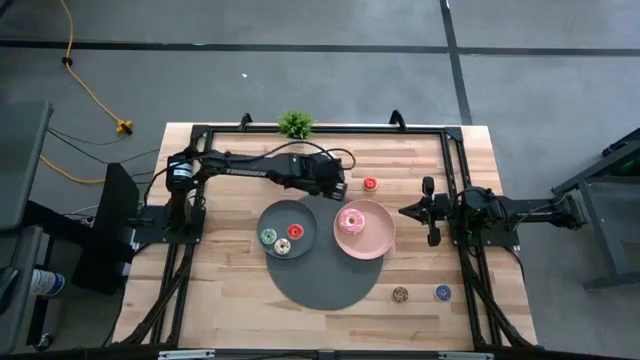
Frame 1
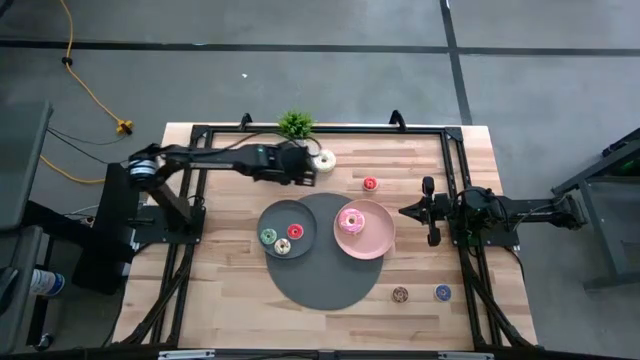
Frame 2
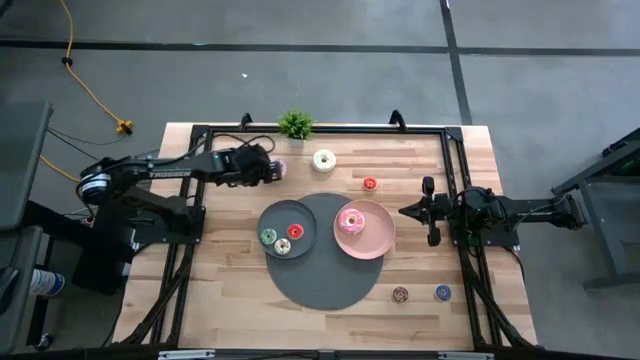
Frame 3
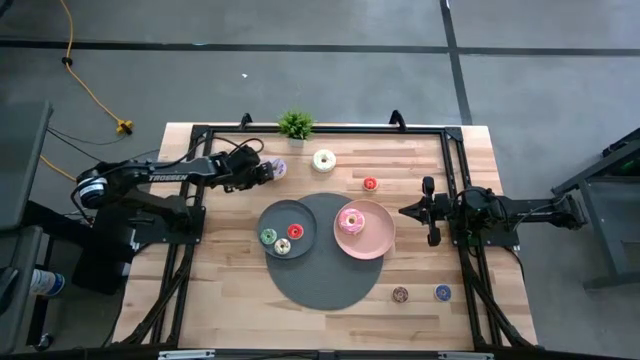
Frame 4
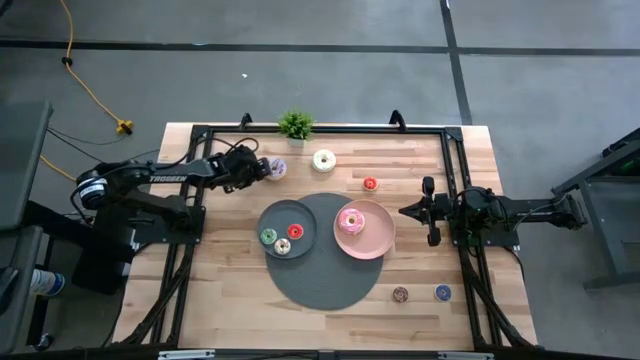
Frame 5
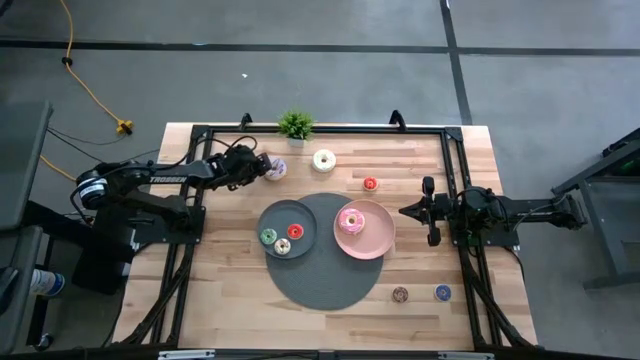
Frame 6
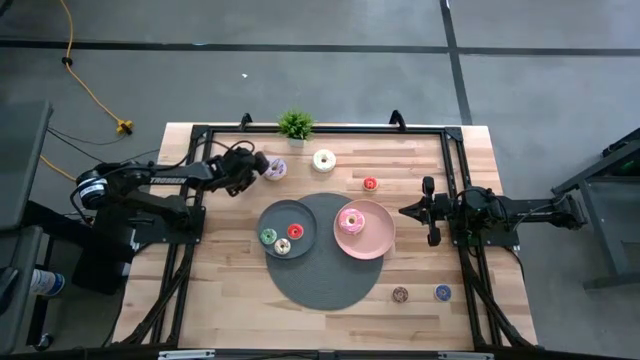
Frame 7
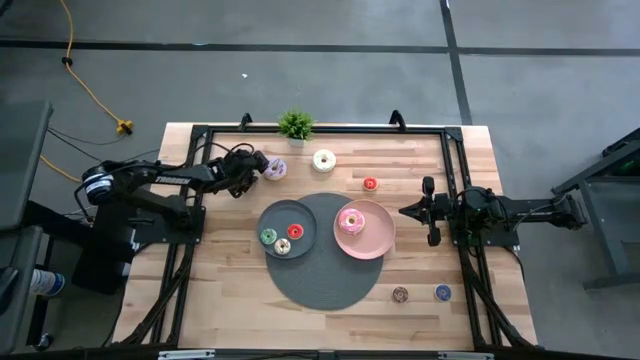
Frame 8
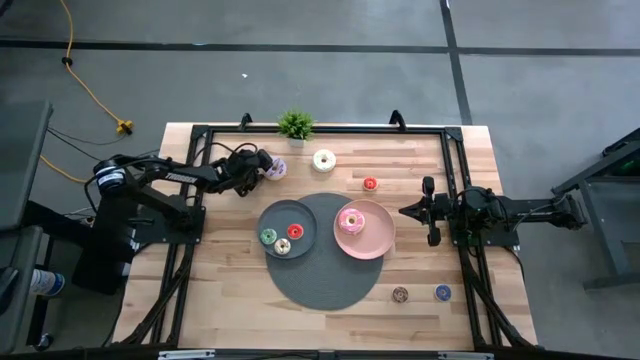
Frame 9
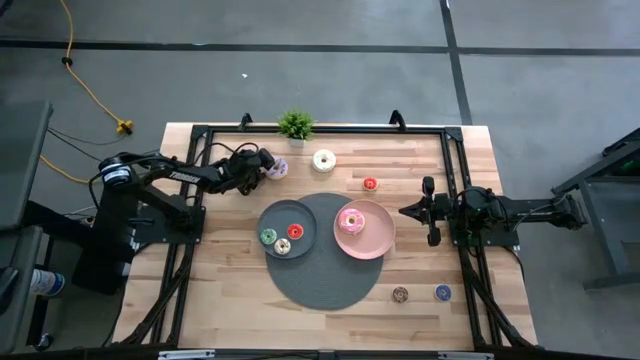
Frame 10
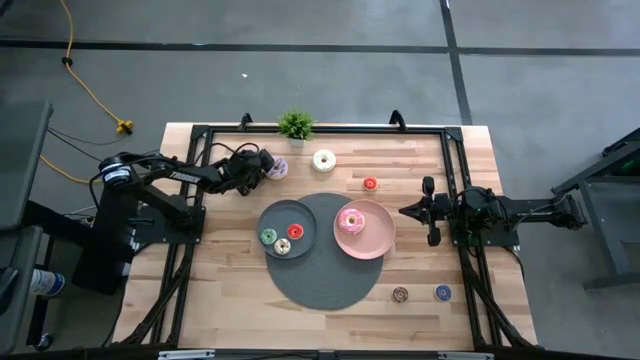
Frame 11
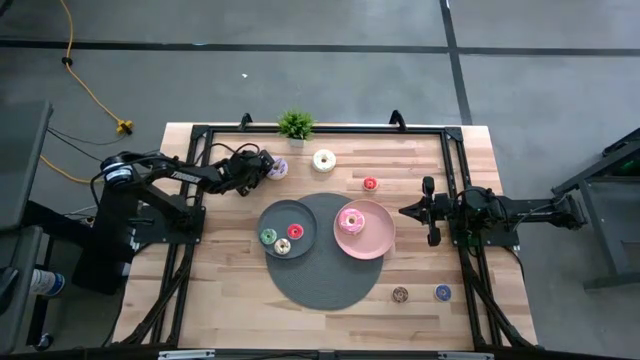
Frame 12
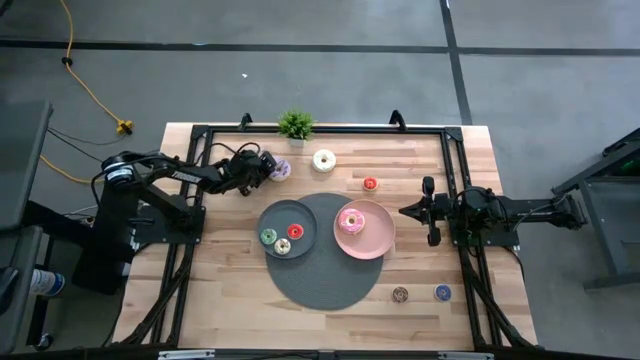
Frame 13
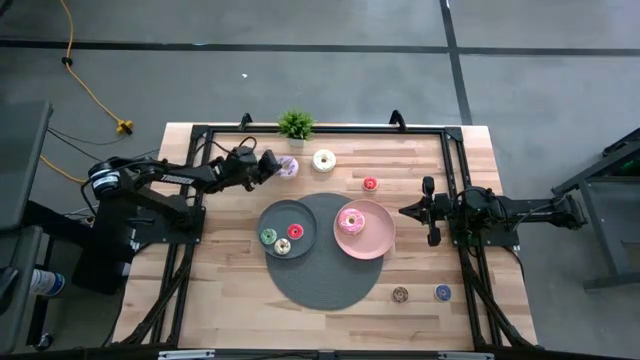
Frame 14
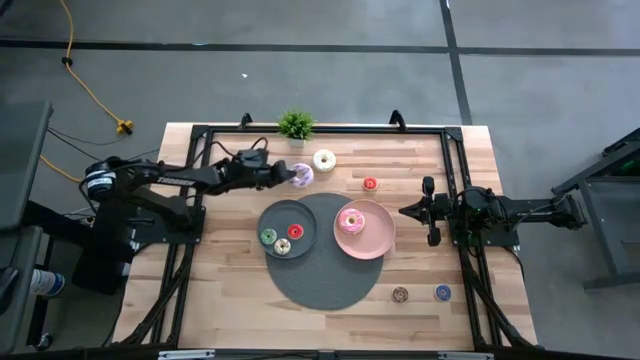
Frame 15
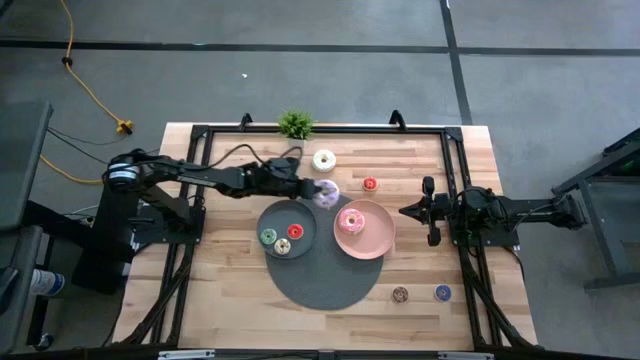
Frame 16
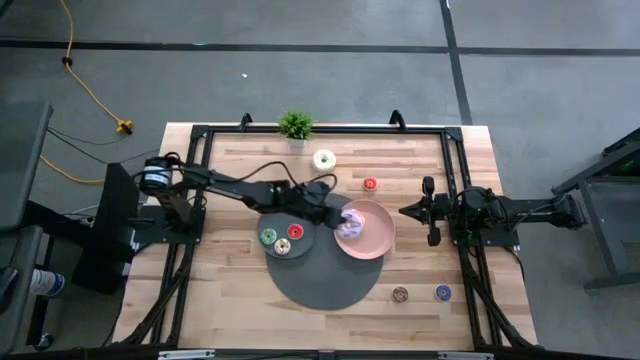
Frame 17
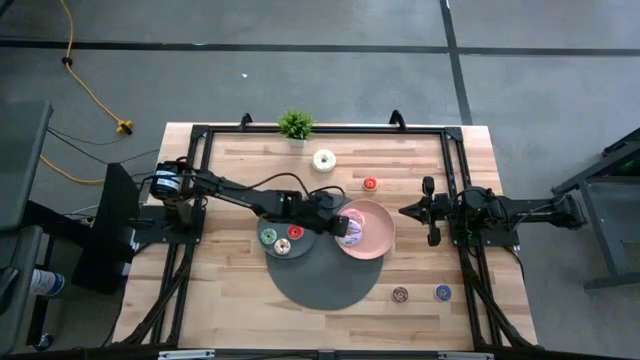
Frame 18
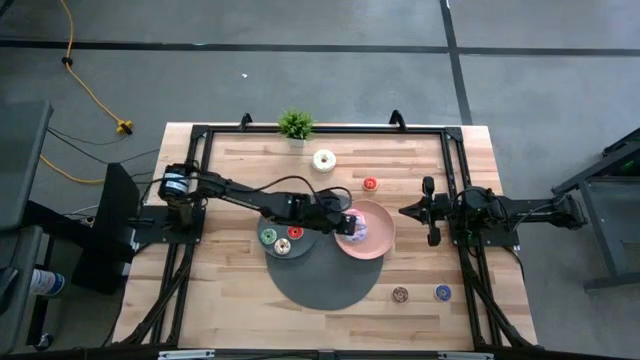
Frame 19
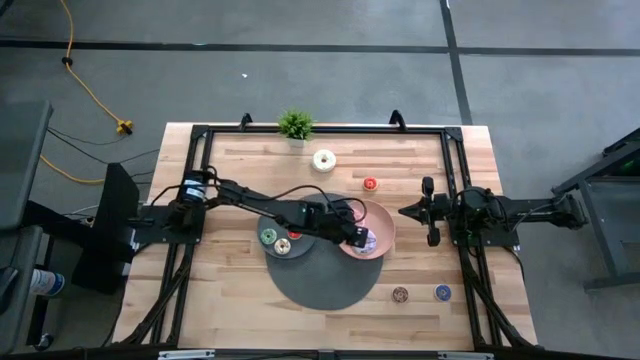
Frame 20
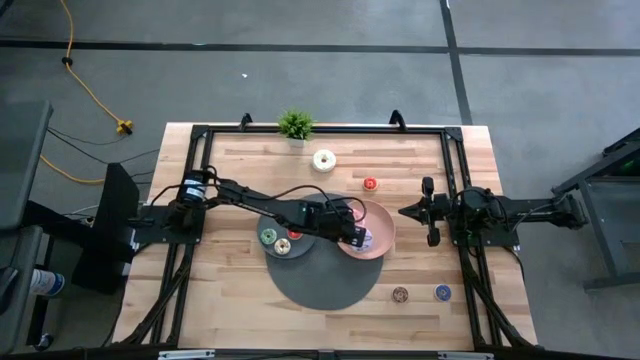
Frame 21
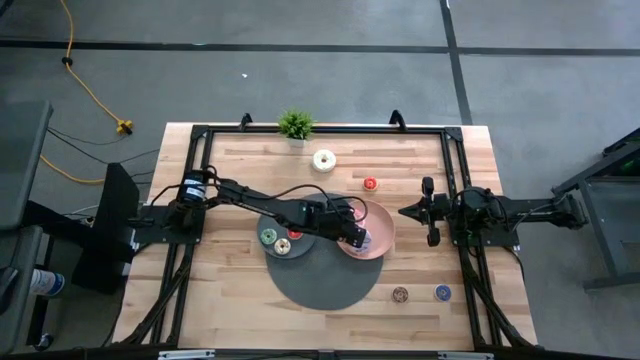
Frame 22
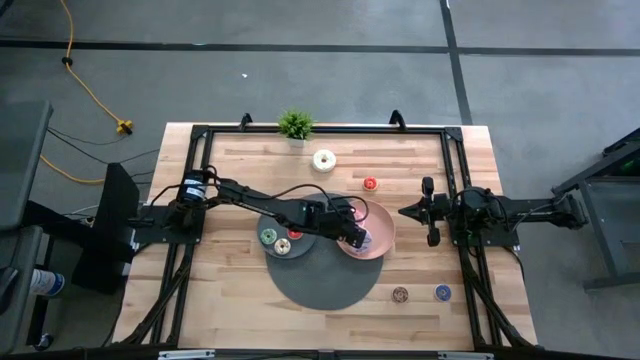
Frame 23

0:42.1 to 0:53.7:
Task: Pick & Place donuts
Put the big purple donut on the pink plate

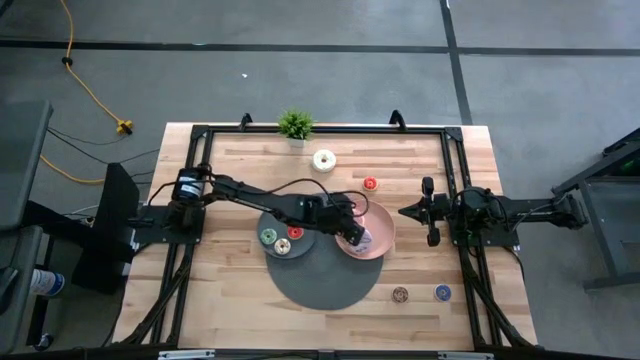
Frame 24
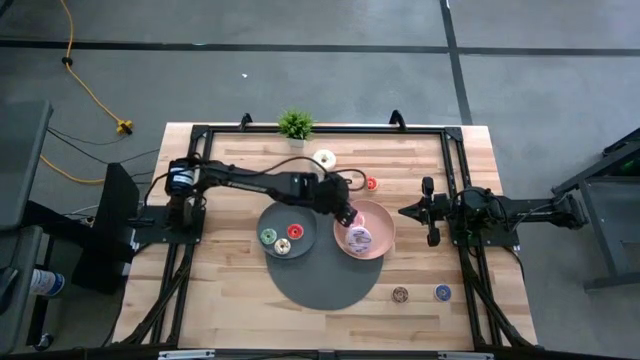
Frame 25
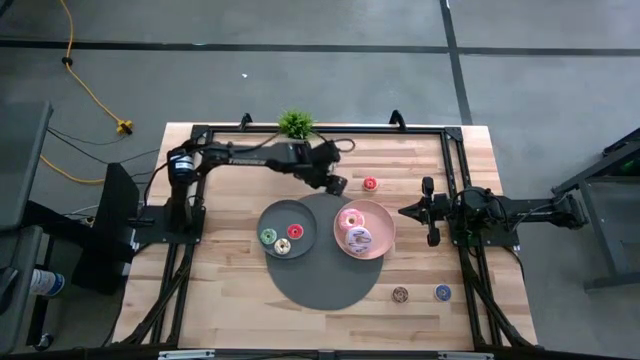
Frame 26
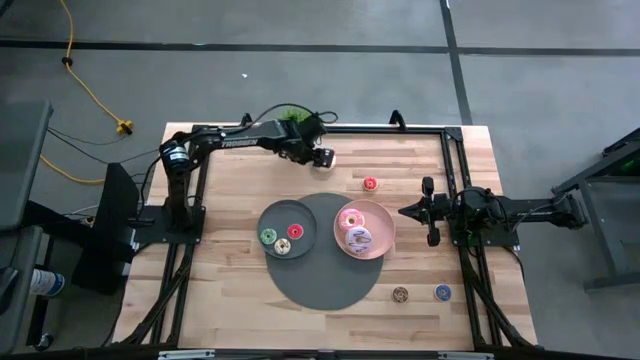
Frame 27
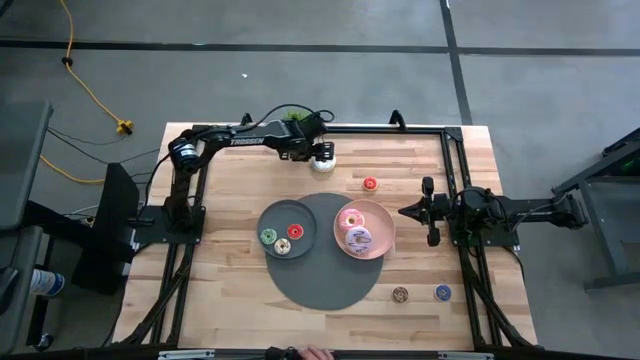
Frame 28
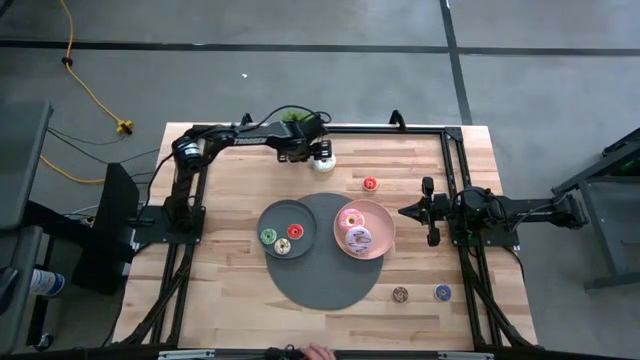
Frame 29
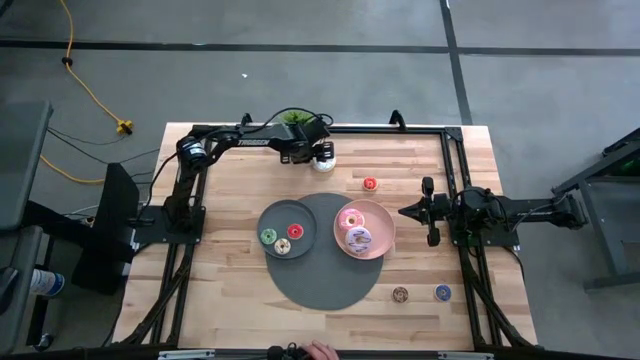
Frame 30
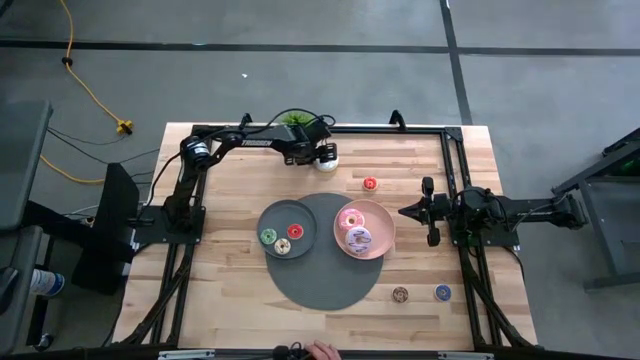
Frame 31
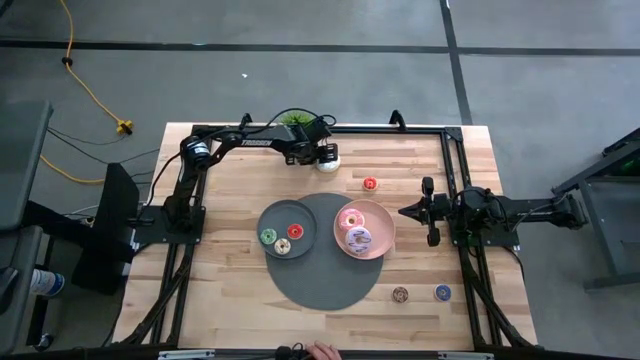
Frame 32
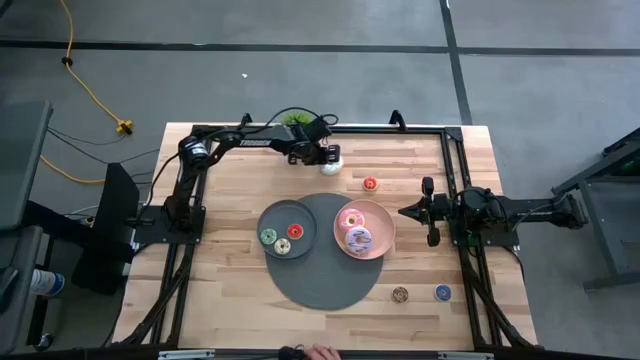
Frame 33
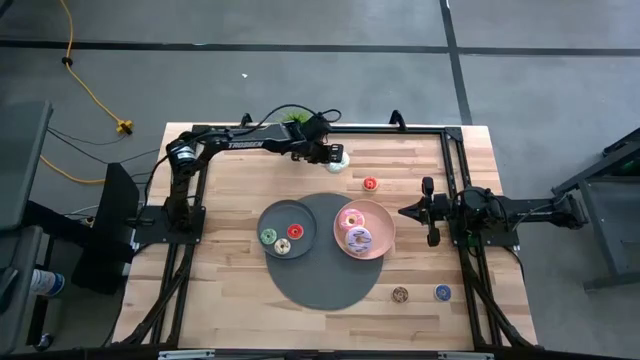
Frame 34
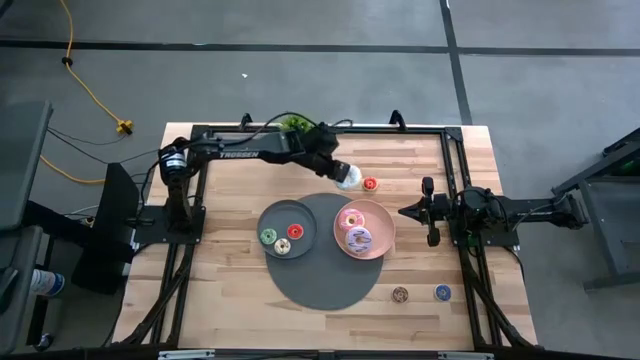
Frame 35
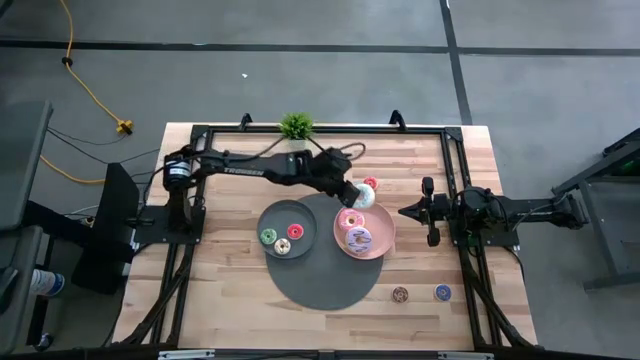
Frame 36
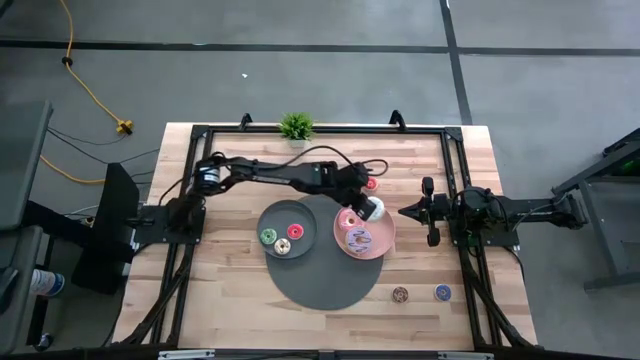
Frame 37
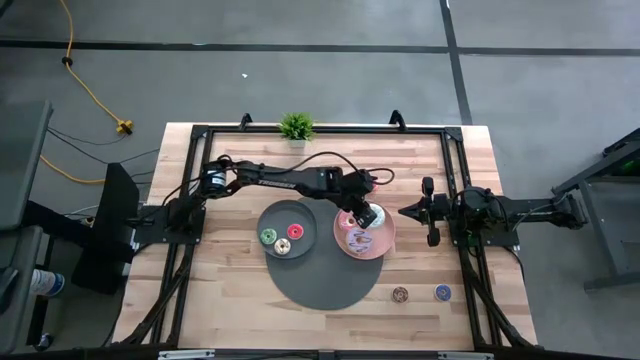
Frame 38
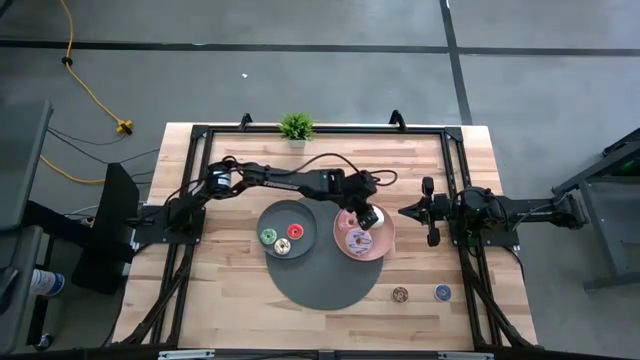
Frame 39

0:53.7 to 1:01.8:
Put the big white donut on the pink plate

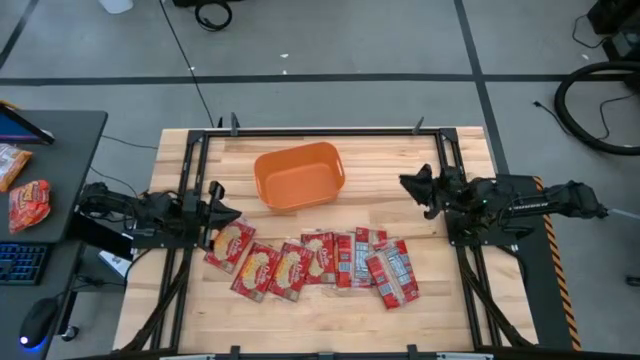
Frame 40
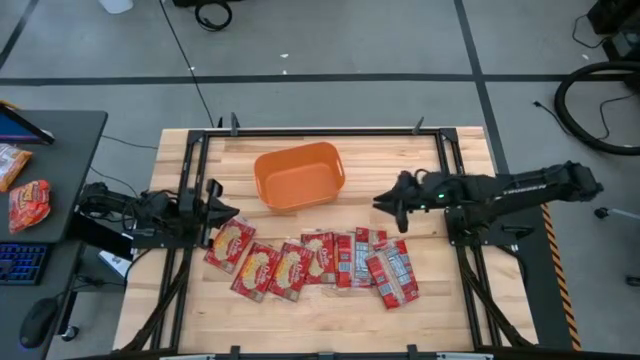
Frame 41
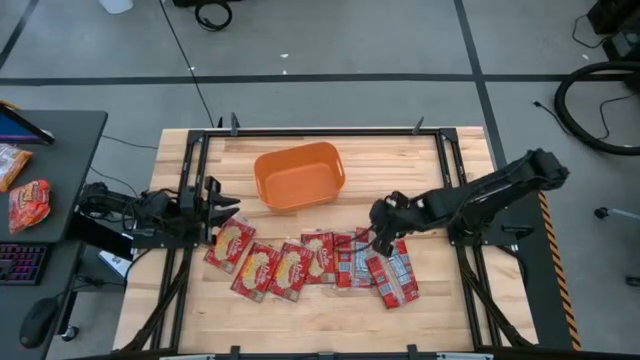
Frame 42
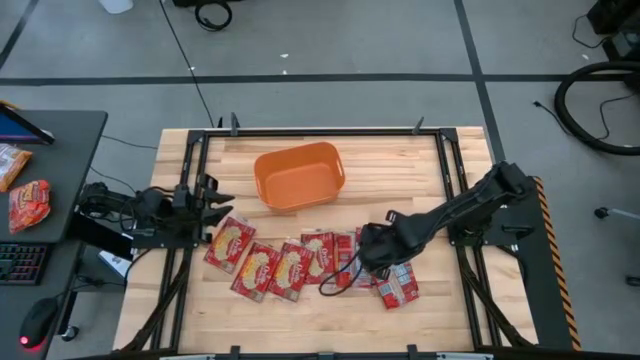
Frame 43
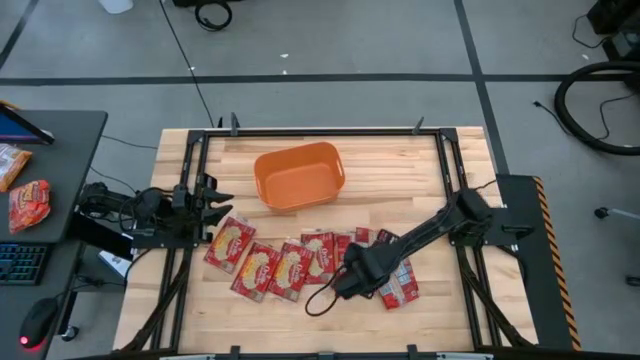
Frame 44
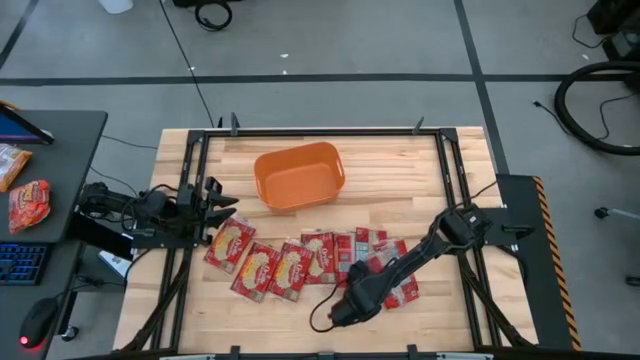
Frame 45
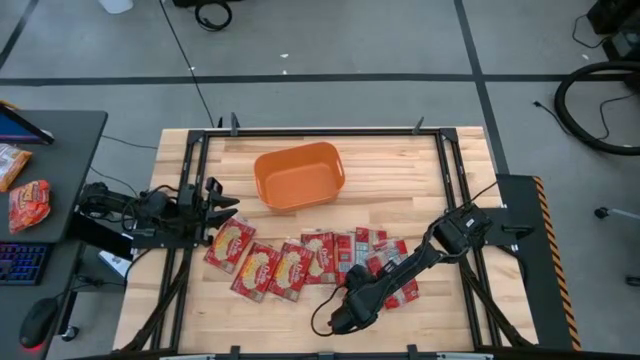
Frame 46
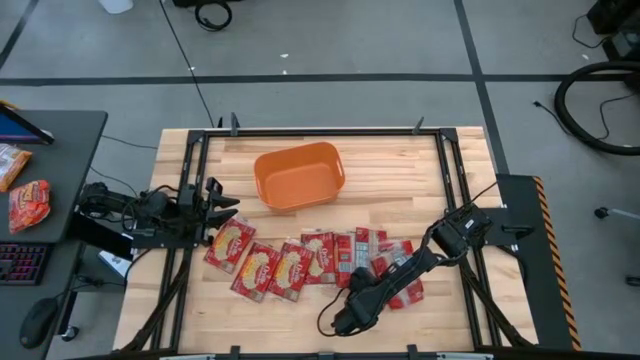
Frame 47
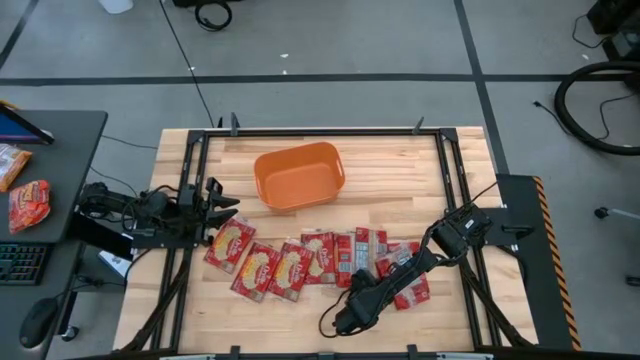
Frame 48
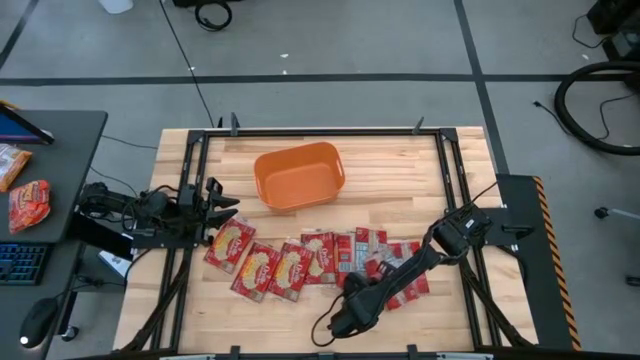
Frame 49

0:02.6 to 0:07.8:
Task: Sort popcorn bags into baskets
Put the popcorn bag into the orange bin
